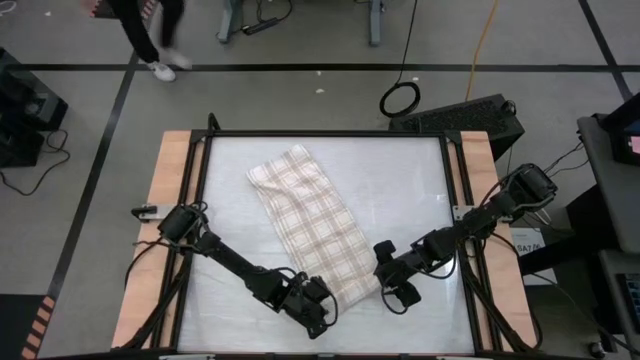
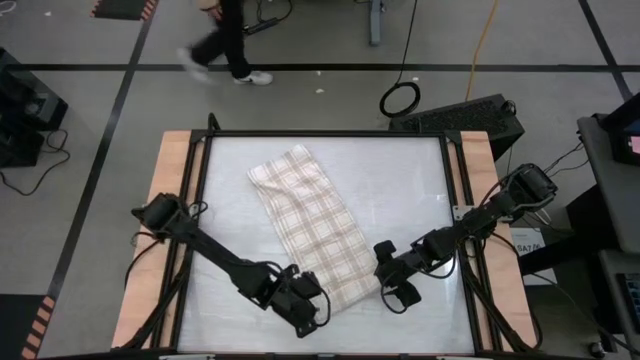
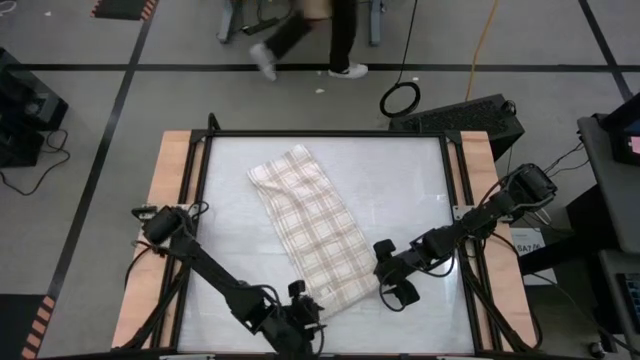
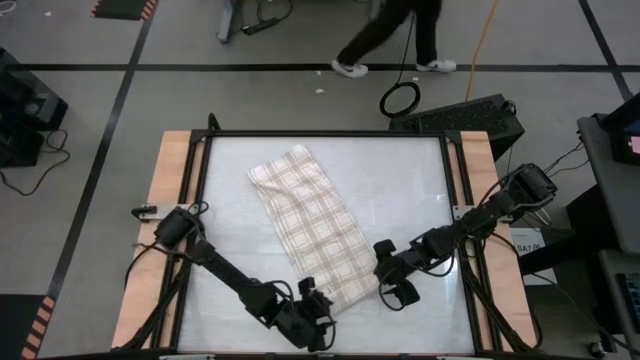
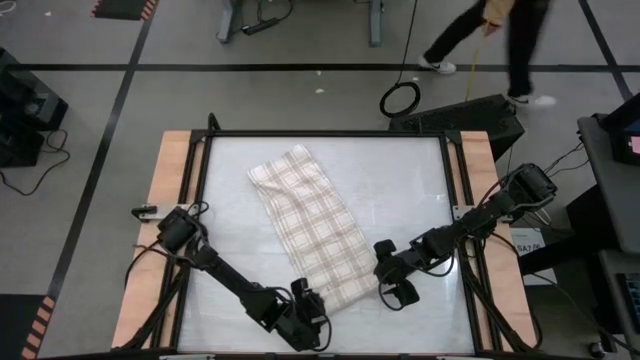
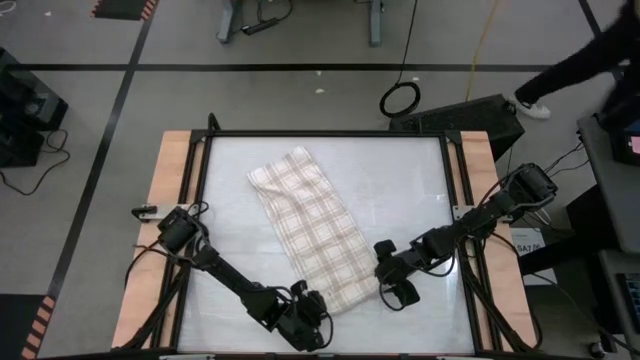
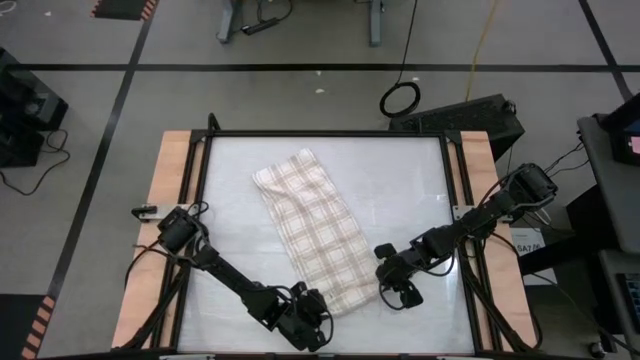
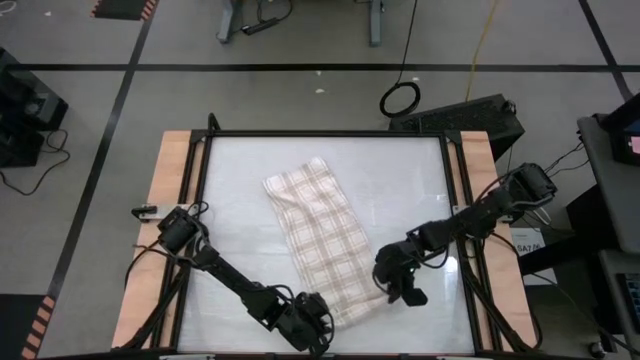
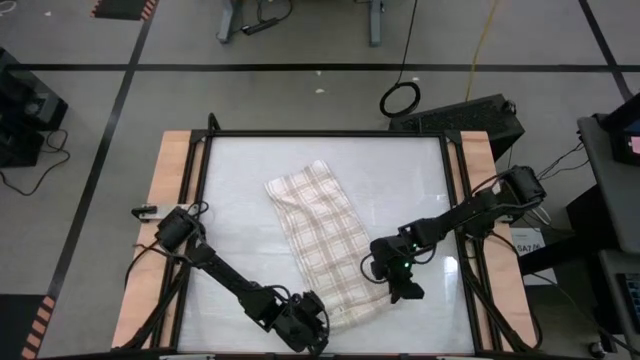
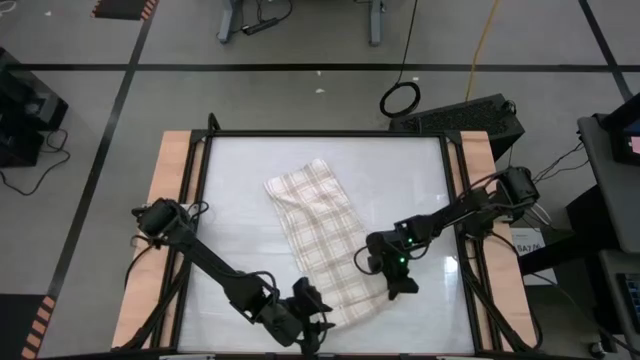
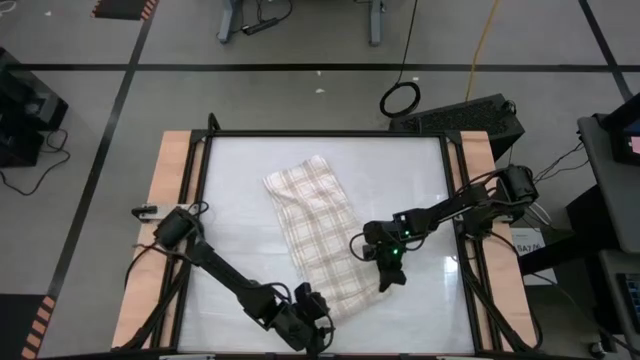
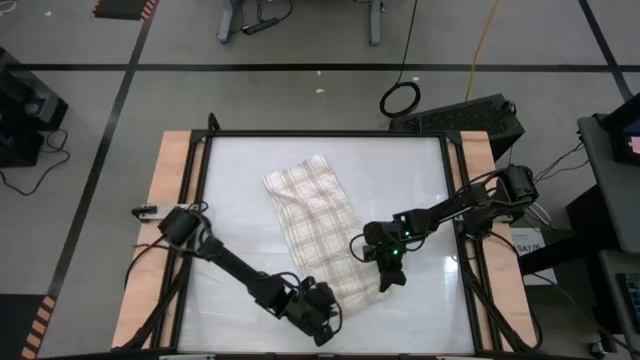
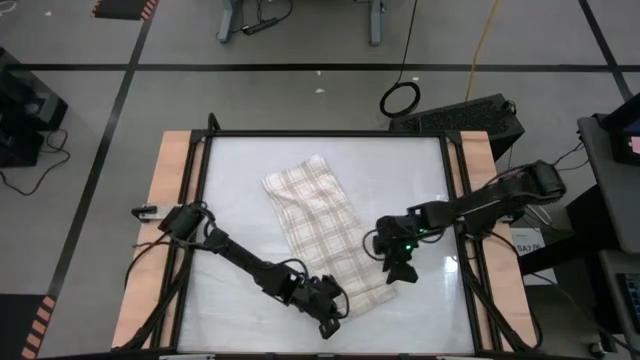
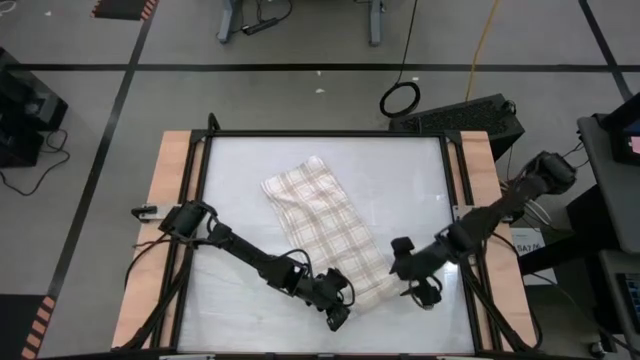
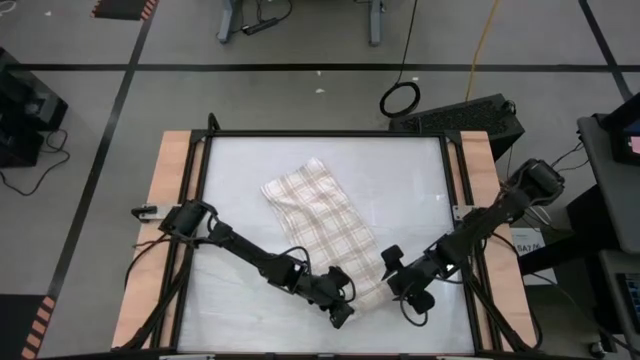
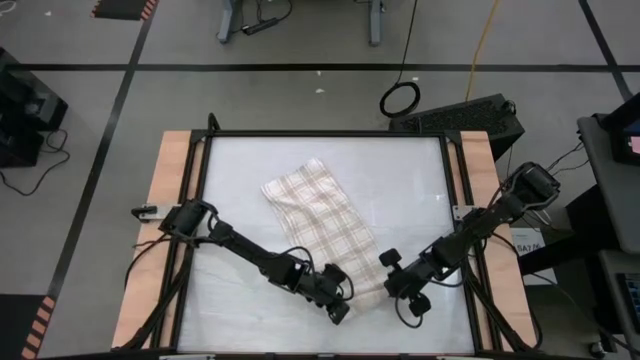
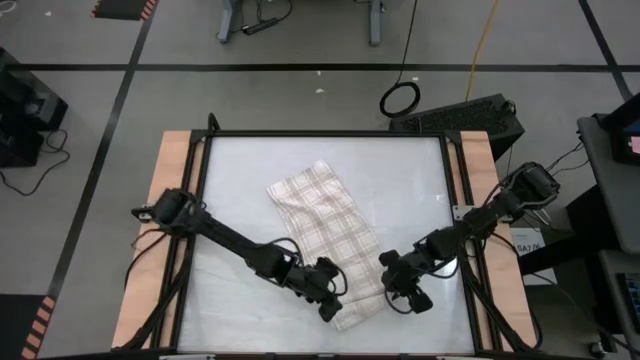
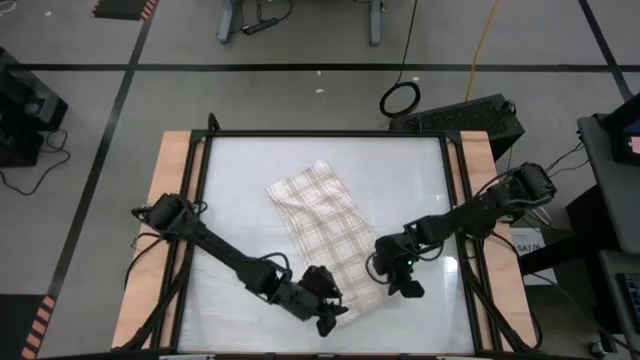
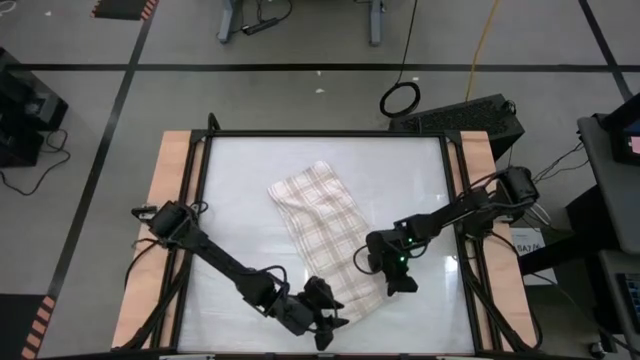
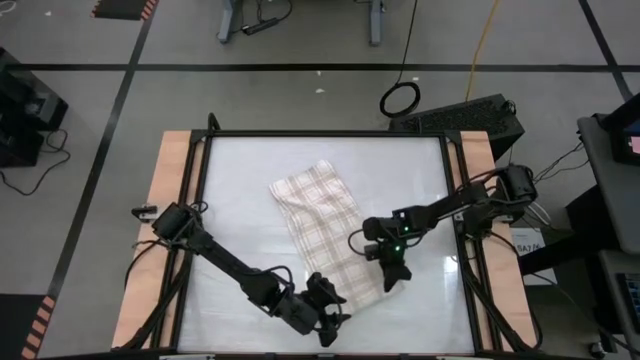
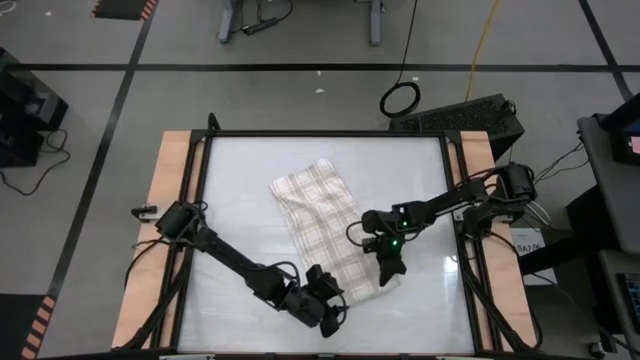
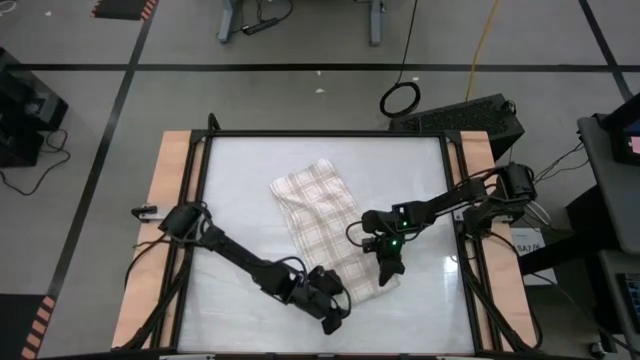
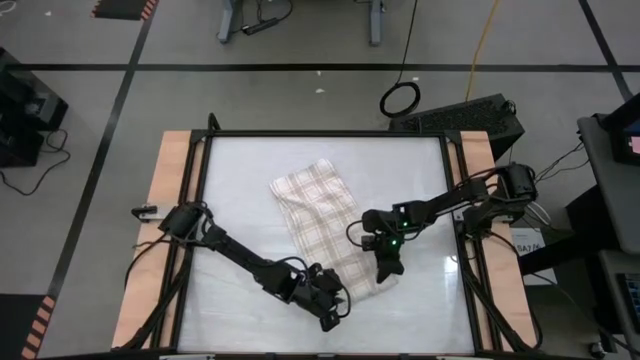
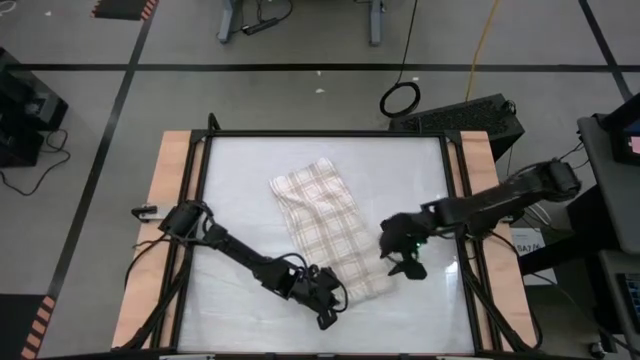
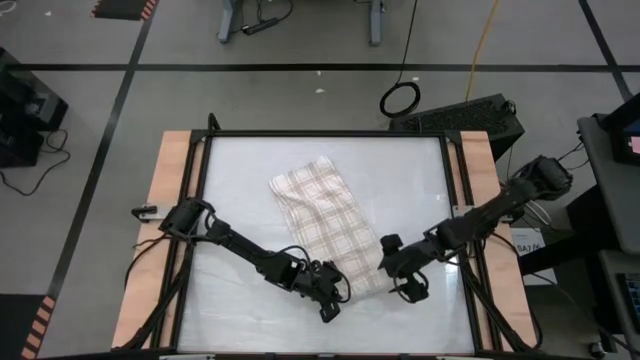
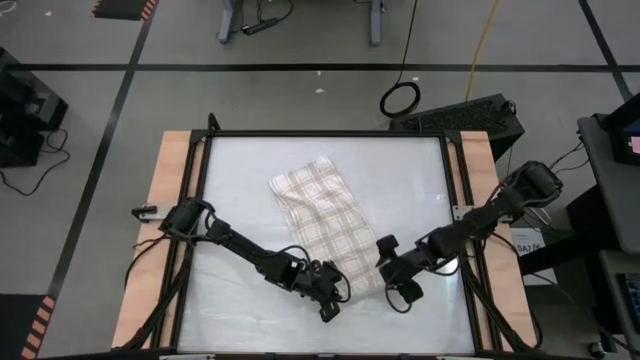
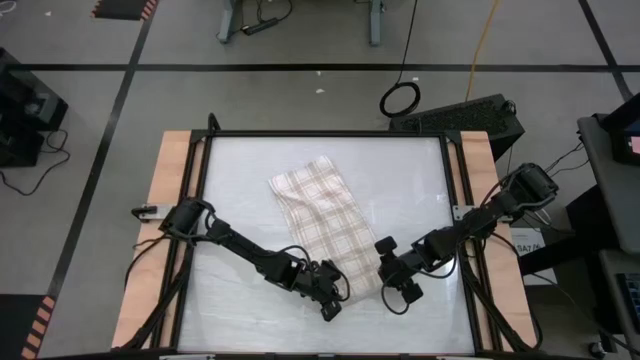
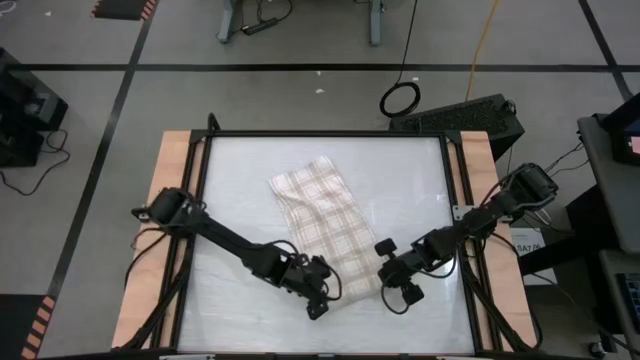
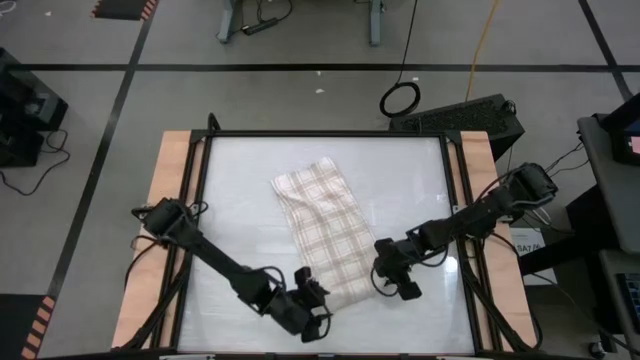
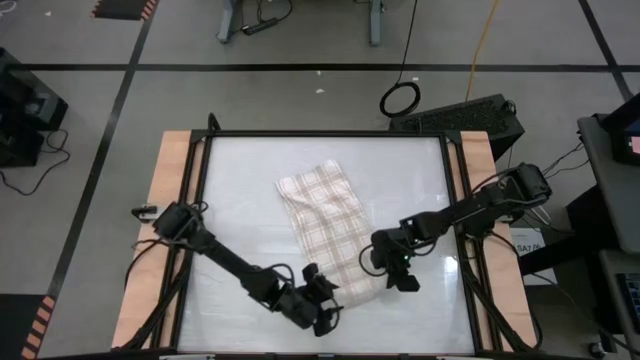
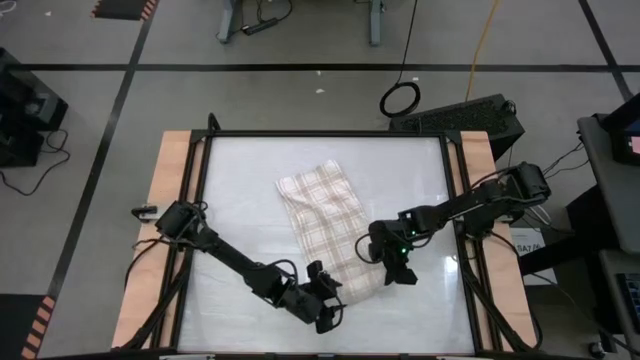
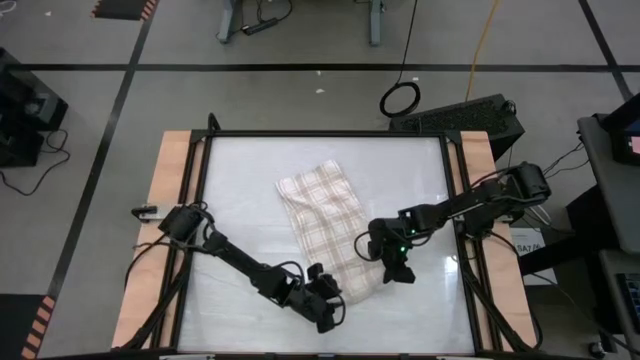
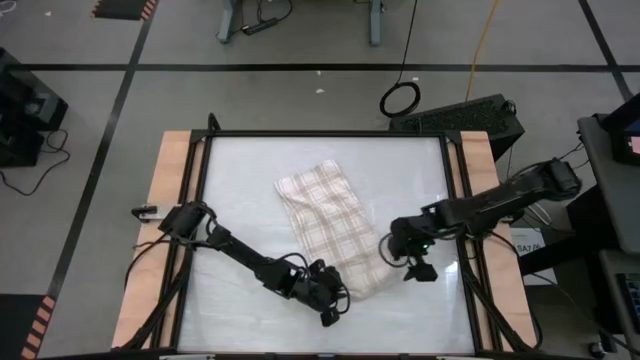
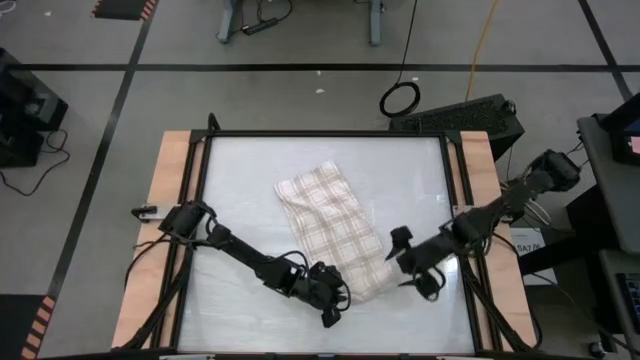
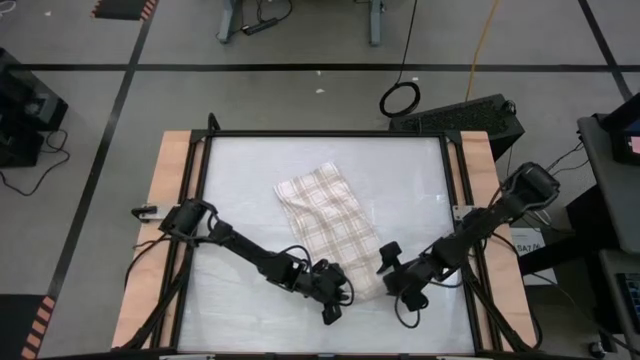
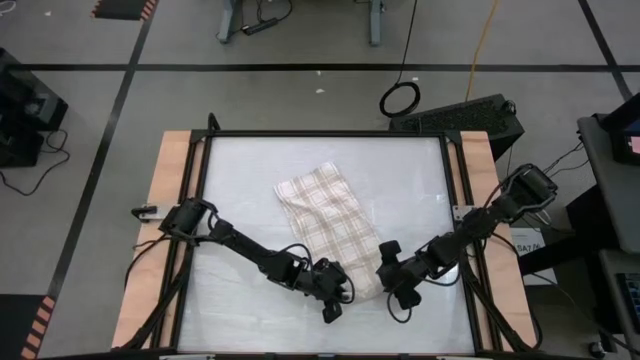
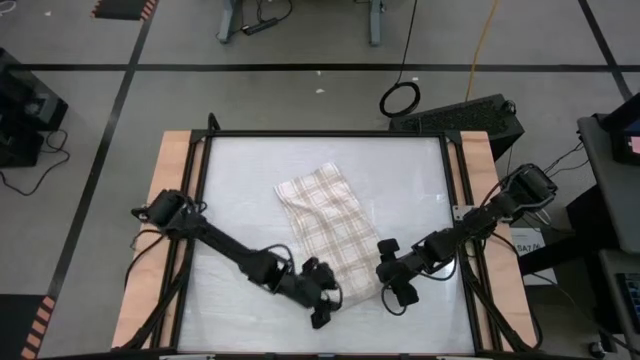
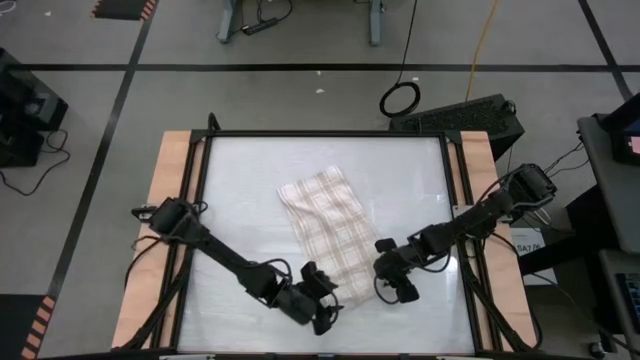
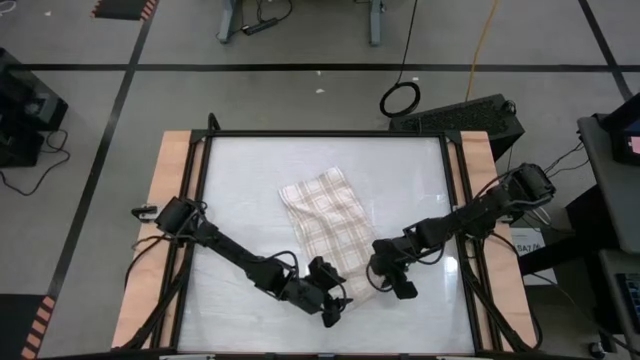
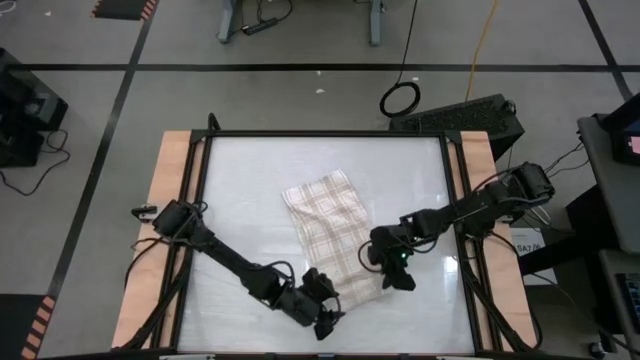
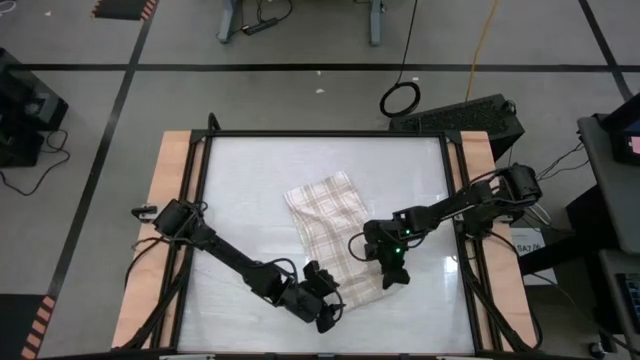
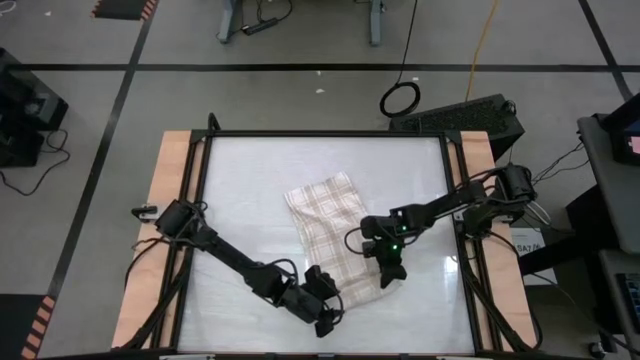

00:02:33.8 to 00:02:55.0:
Task: Roll towel
Roll the white-brown patterned towel

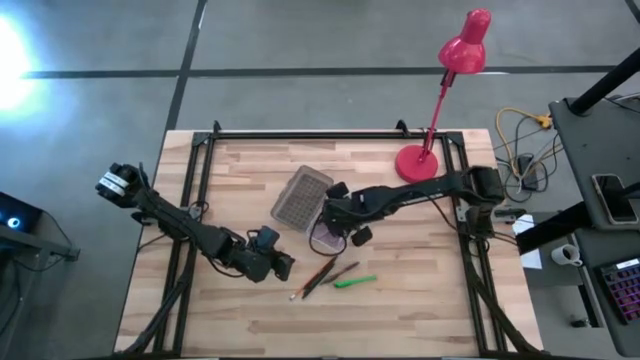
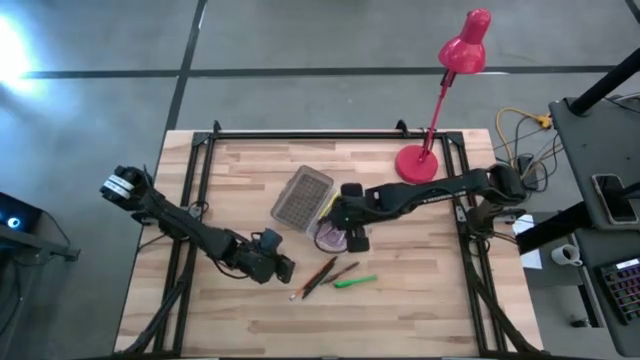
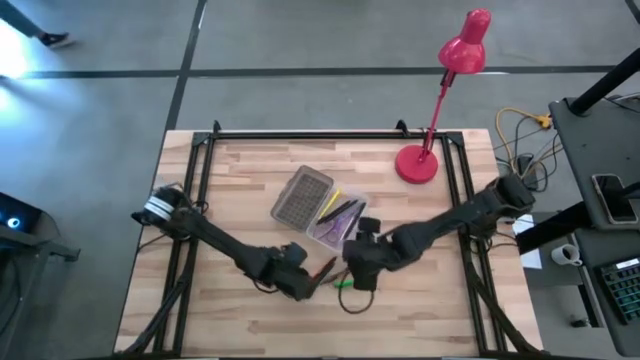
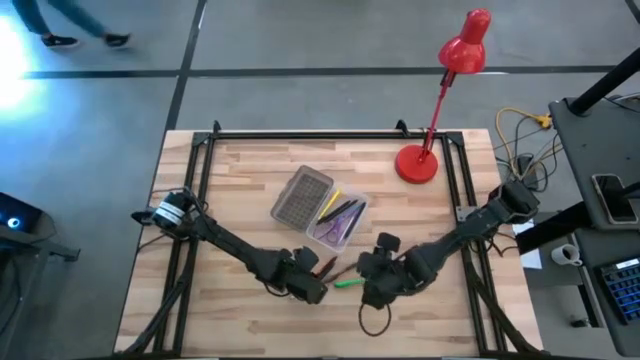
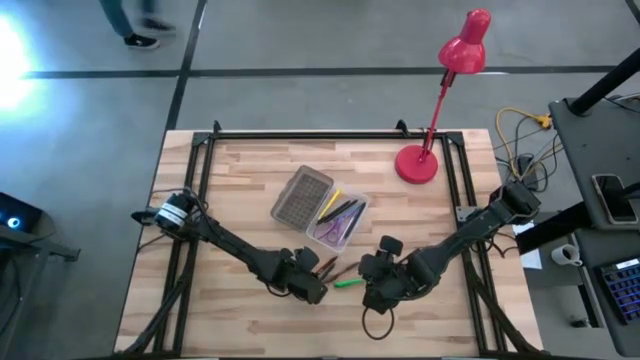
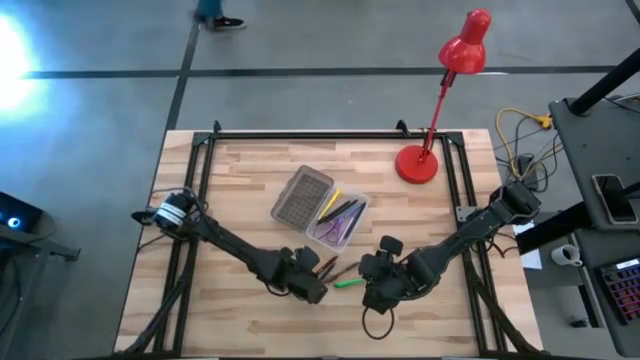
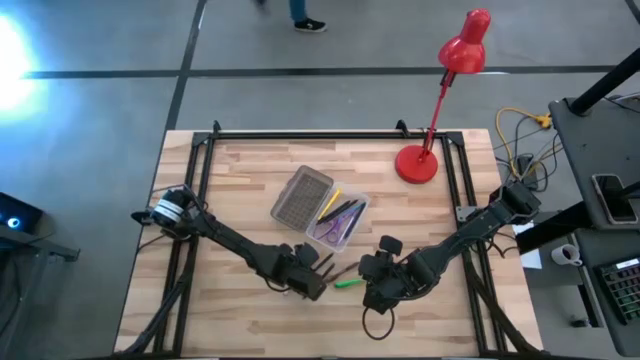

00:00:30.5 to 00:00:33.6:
Task: Pick & place school supplies into a supply box
Put the yellow pencil into the gray supply box
